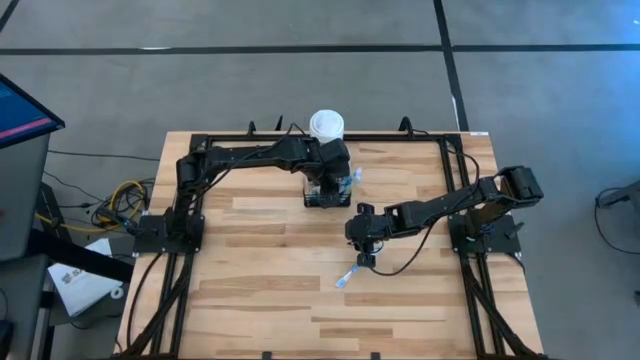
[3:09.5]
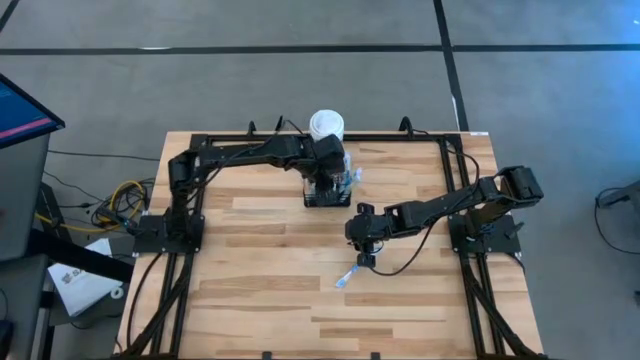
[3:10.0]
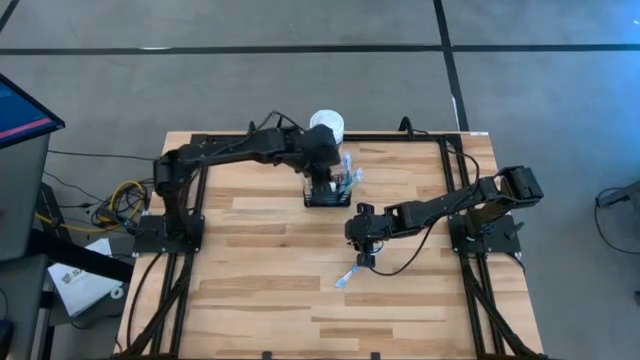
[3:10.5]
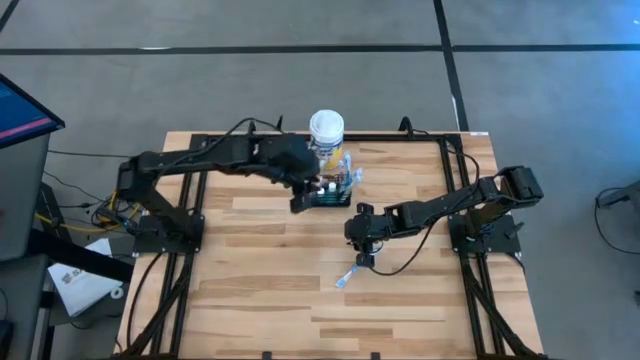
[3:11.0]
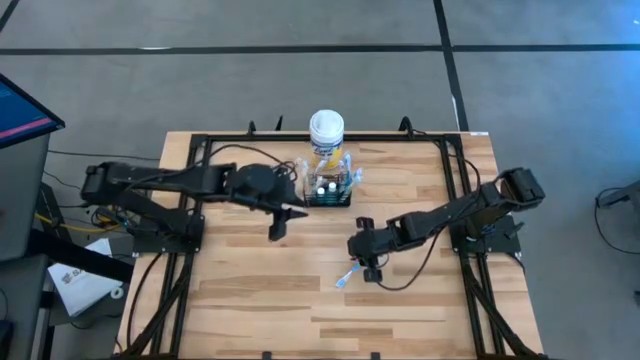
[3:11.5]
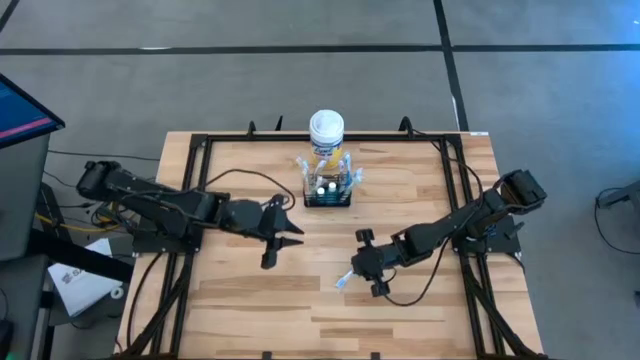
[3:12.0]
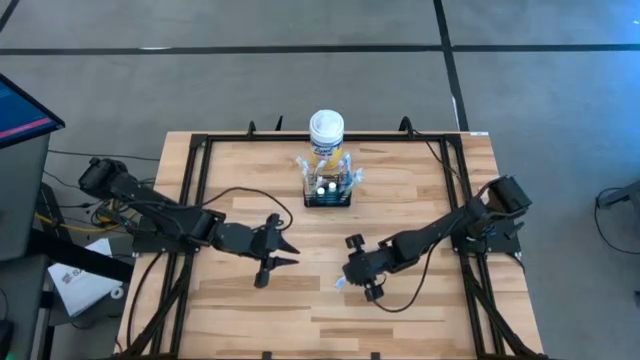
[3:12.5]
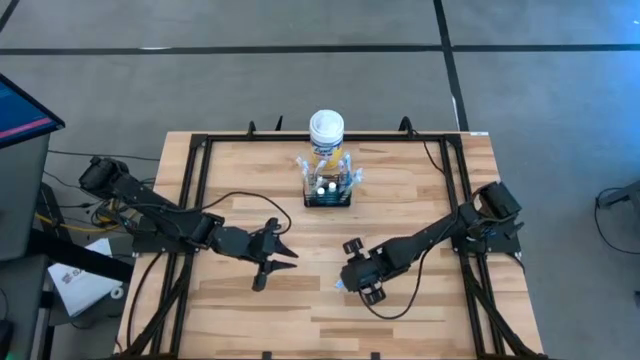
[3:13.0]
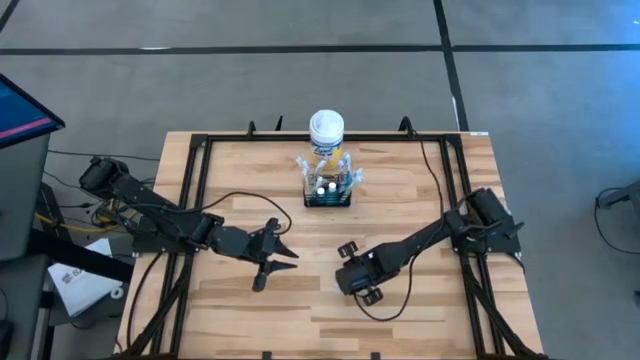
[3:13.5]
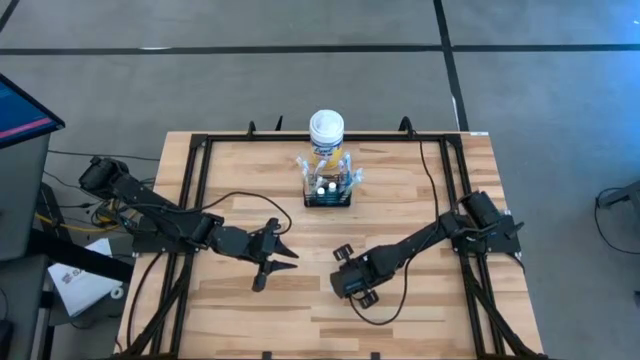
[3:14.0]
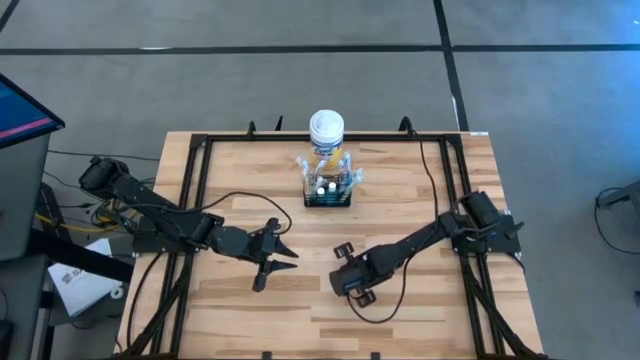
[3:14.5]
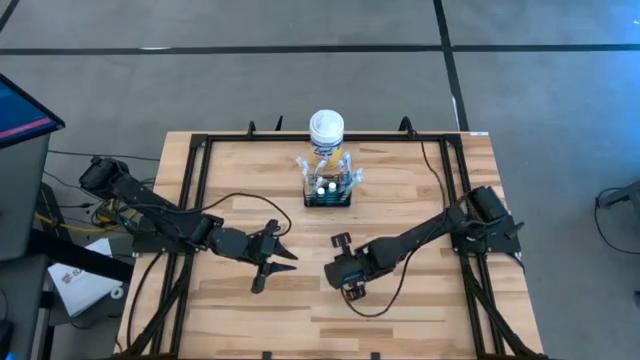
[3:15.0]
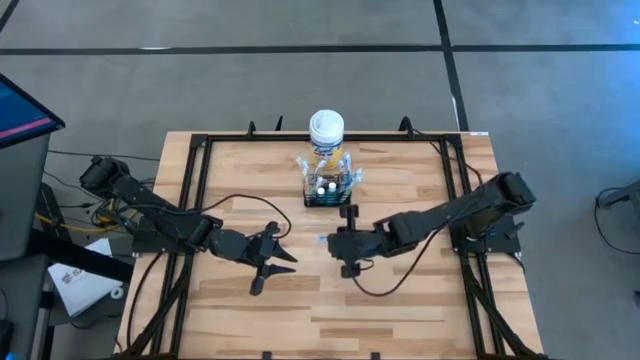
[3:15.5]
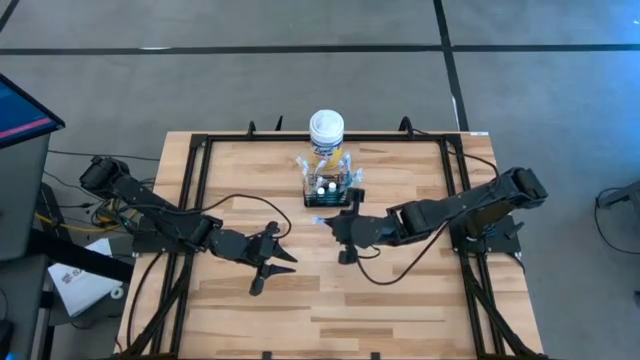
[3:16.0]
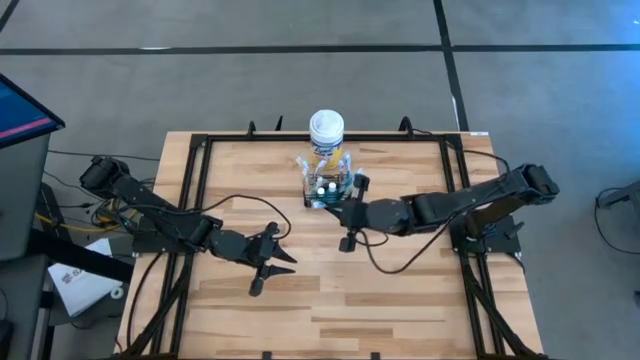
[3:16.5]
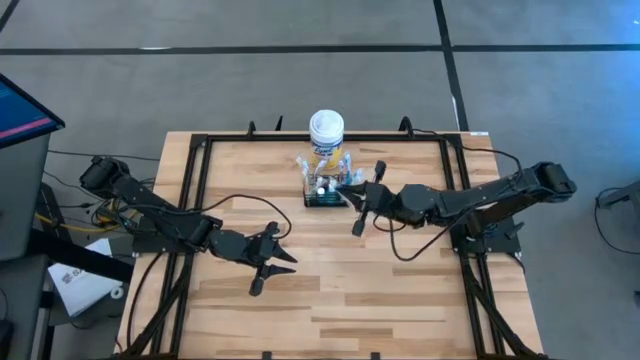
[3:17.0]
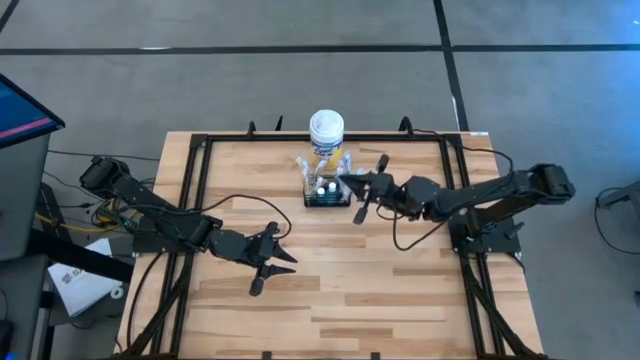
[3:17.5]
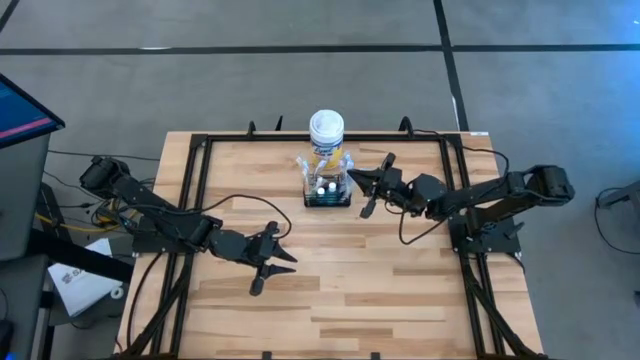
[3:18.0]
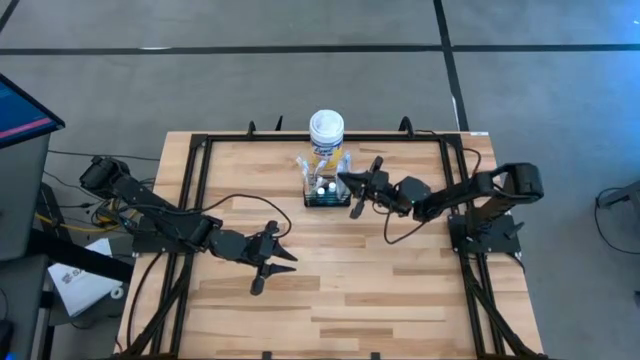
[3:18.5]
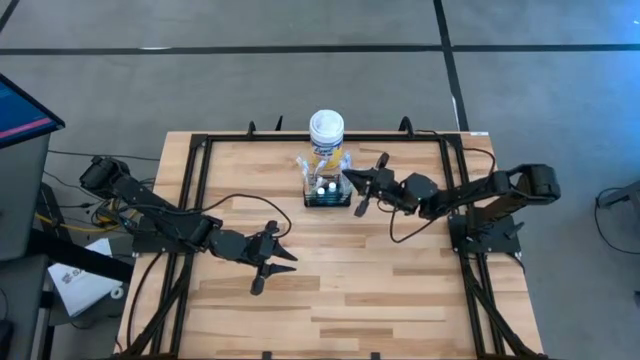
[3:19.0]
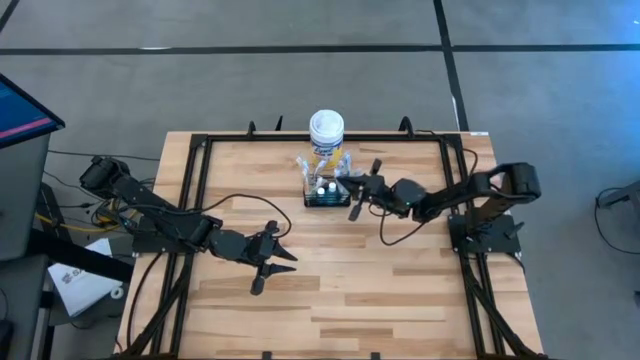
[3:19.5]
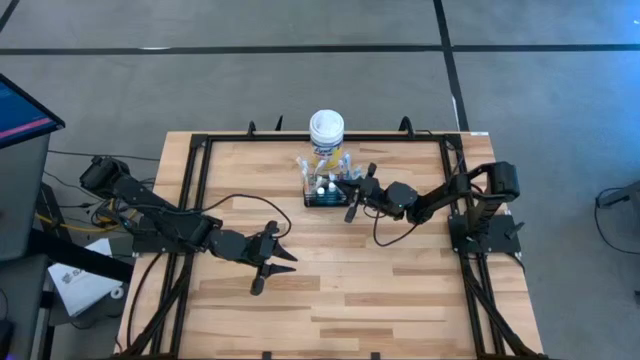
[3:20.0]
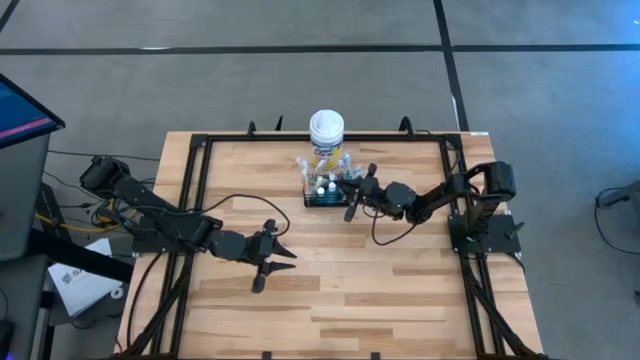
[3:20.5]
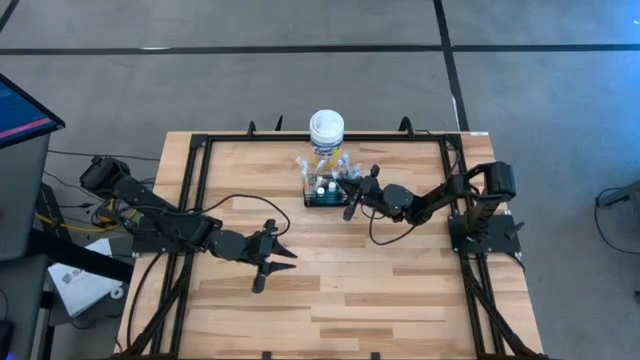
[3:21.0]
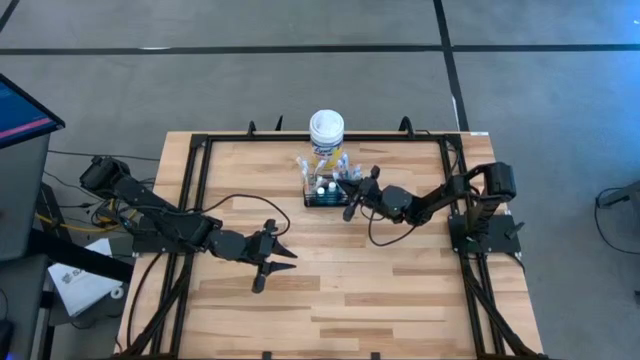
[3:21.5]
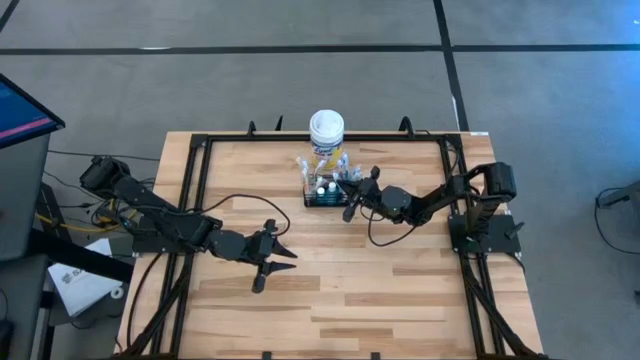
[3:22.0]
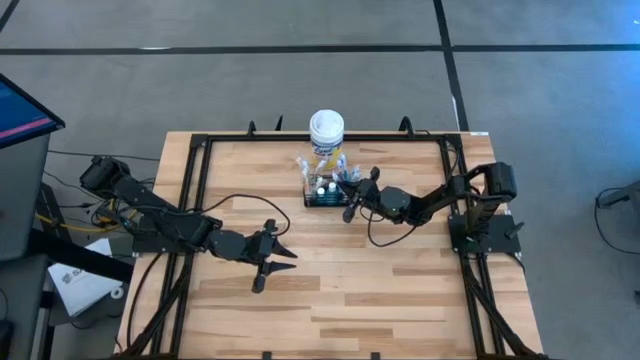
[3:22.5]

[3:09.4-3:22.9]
Task: Pick & Place toothbrushing station
Put the blue toothbrush into the black wire organizer

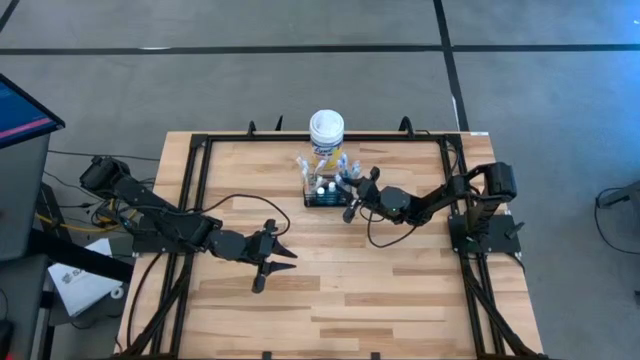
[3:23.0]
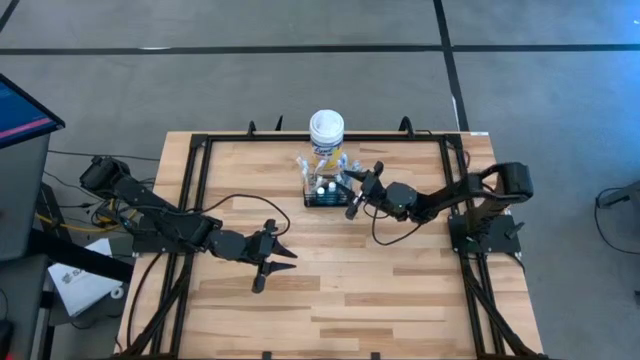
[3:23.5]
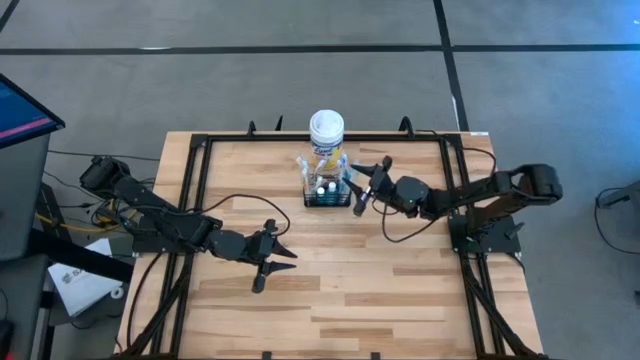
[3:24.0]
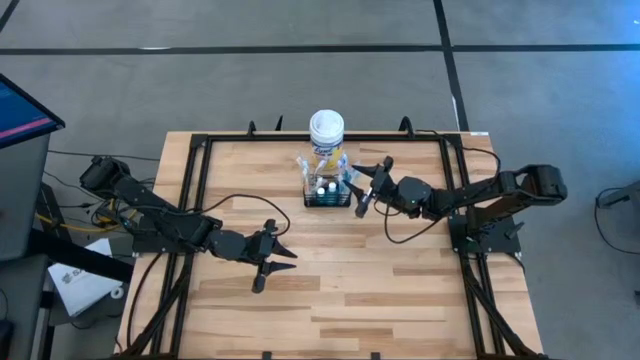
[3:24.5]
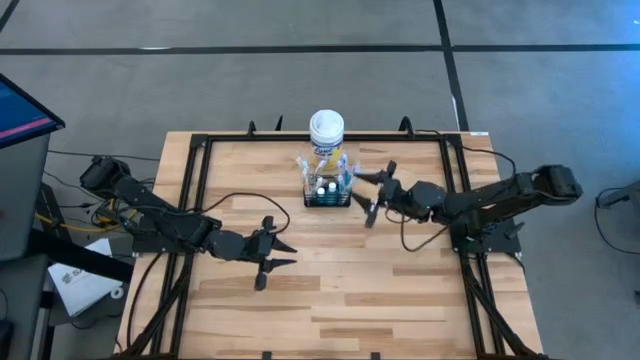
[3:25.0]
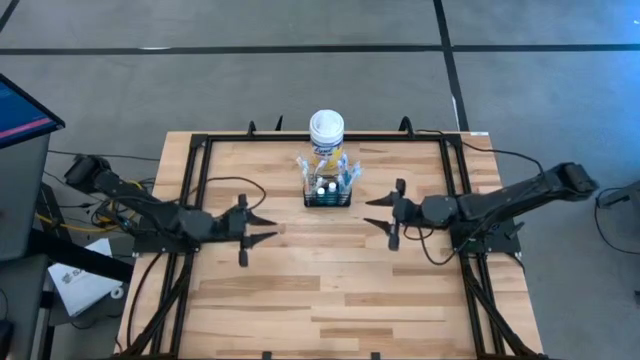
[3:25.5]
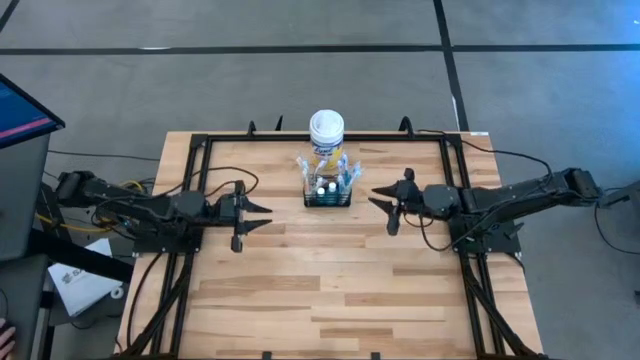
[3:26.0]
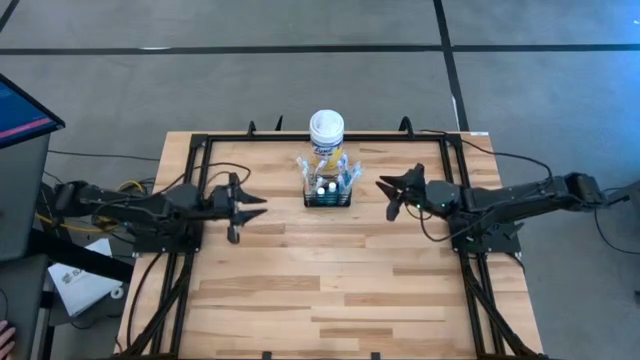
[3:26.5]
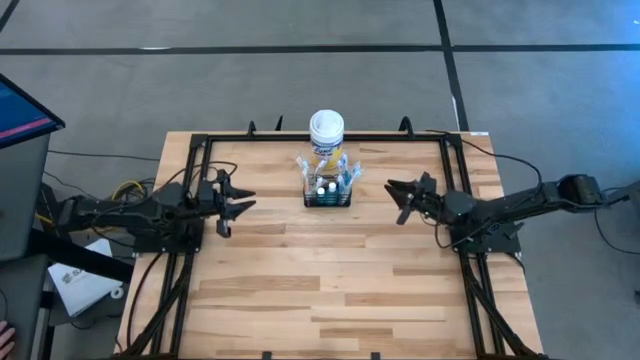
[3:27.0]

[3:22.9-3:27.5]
Return to Home Position

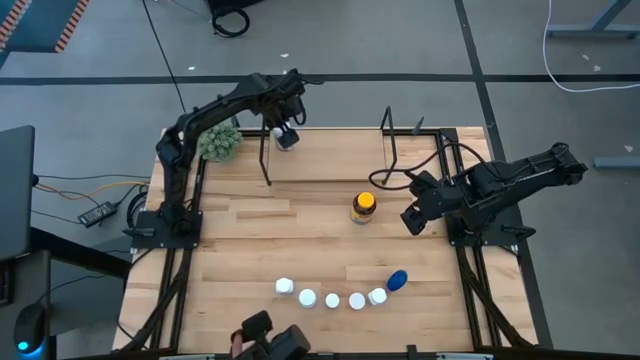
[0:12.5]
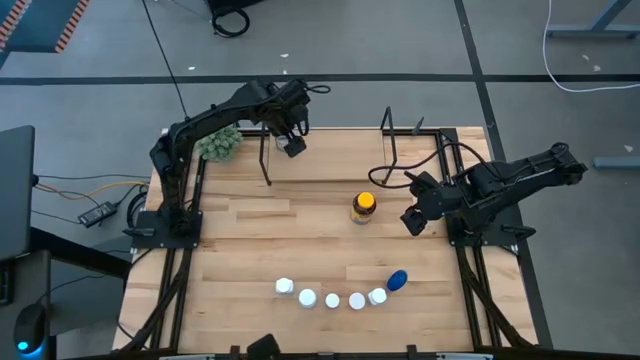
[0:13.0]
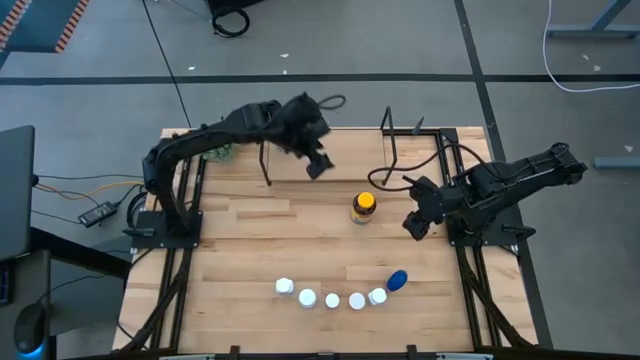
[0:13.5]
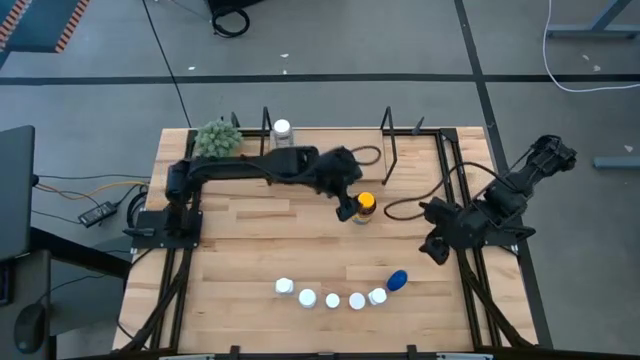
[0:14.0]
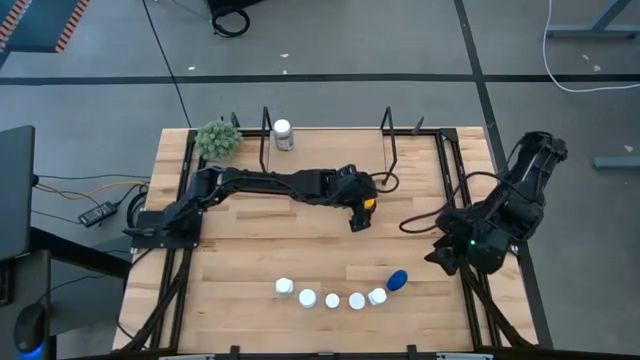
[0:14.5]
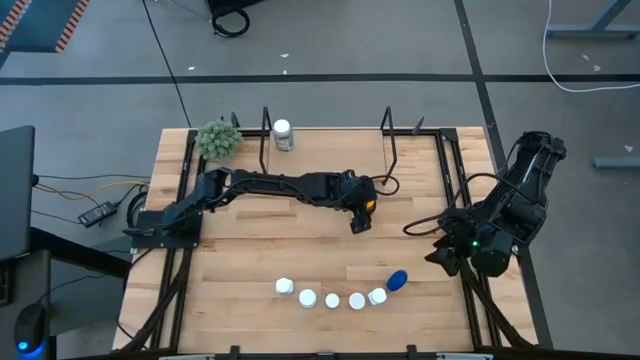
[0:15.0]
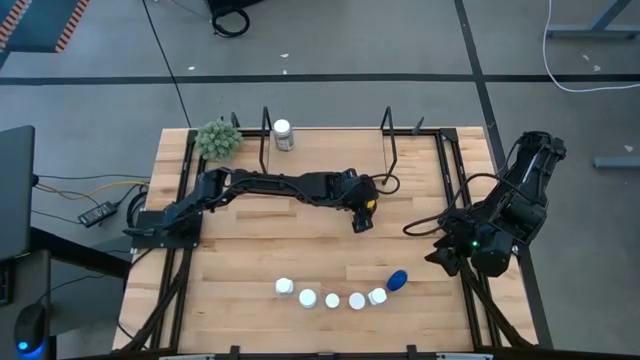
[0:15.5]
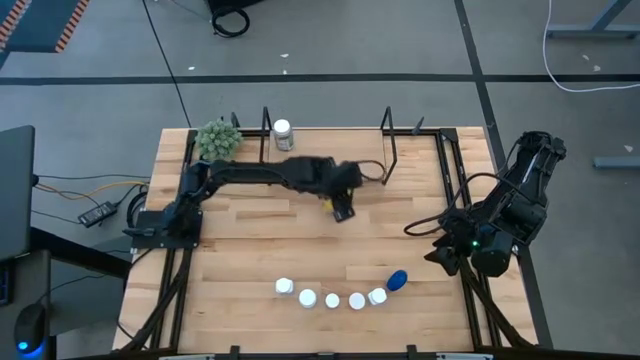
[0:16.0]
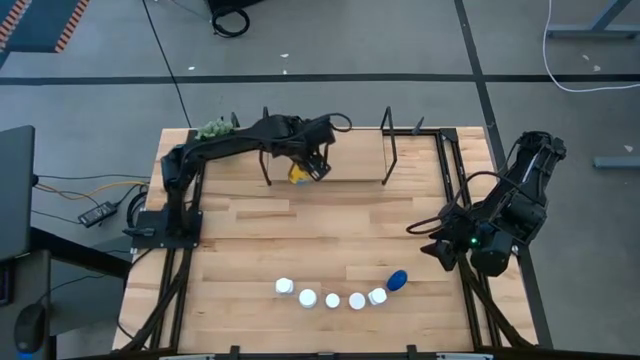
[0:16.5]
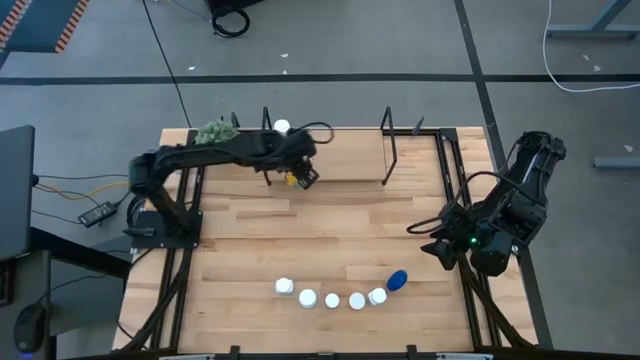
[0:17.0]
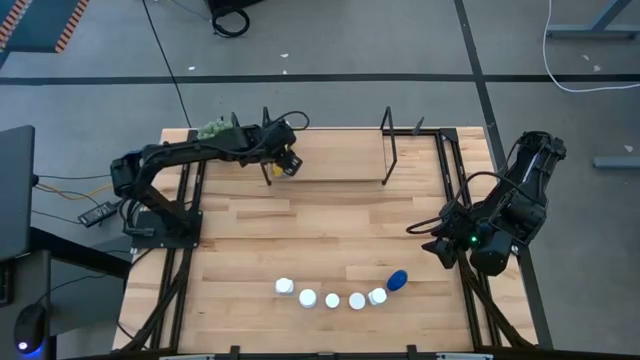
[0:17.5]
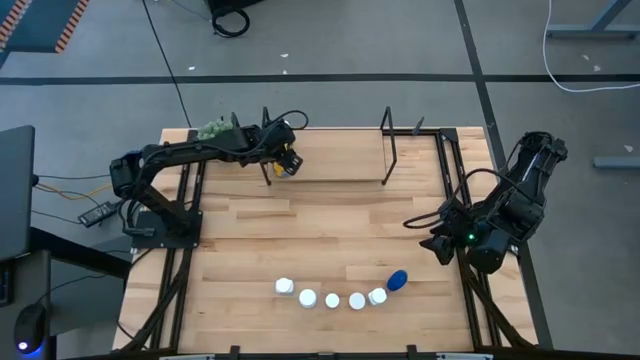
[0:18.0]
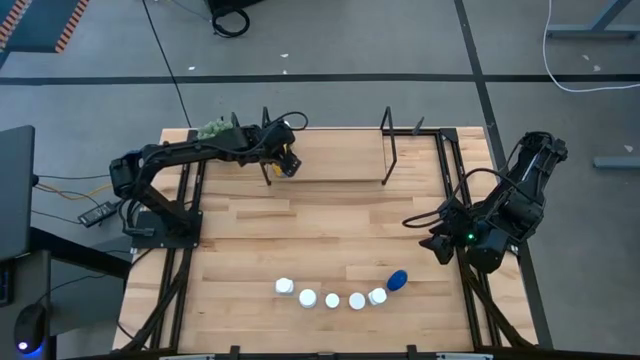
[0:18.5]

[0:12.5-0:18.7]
Task: Pick and place medicine bottles onto shelf by color
Put the yellow medicine bottle on the shelf
